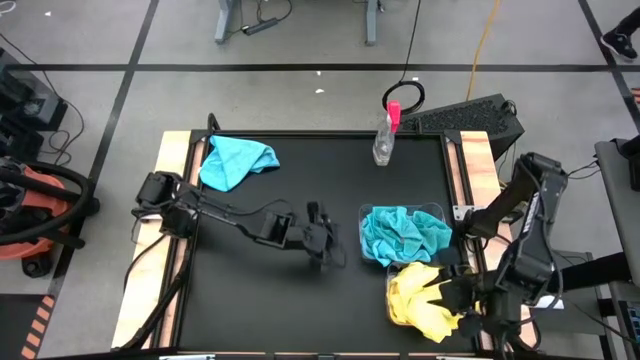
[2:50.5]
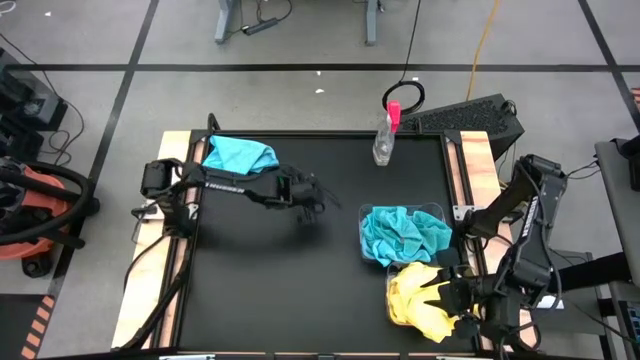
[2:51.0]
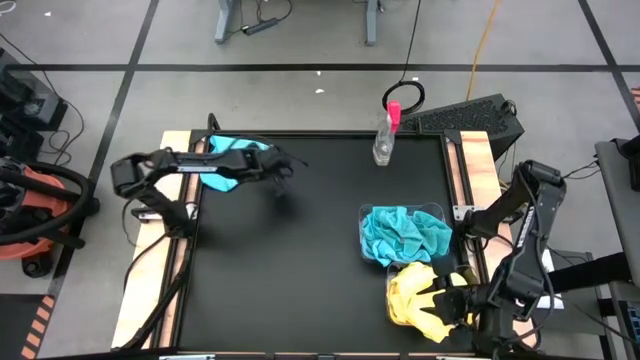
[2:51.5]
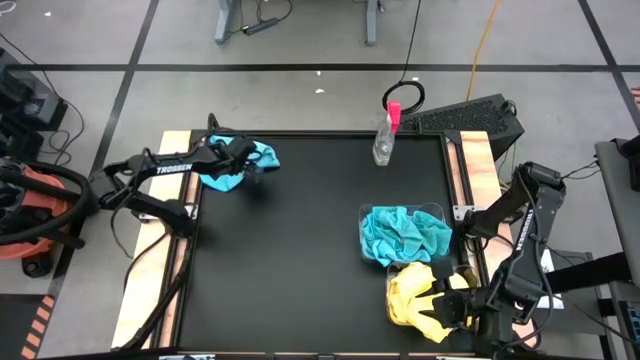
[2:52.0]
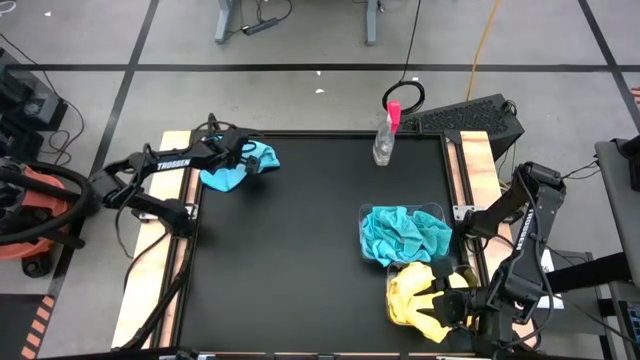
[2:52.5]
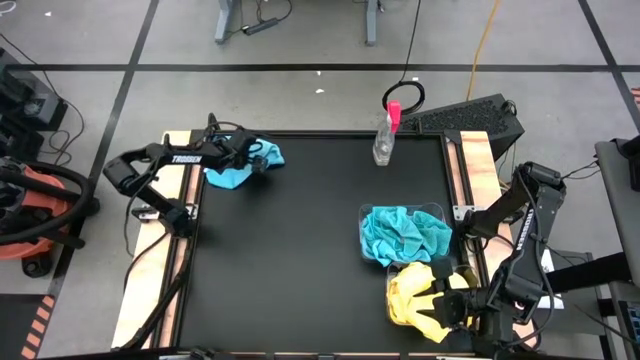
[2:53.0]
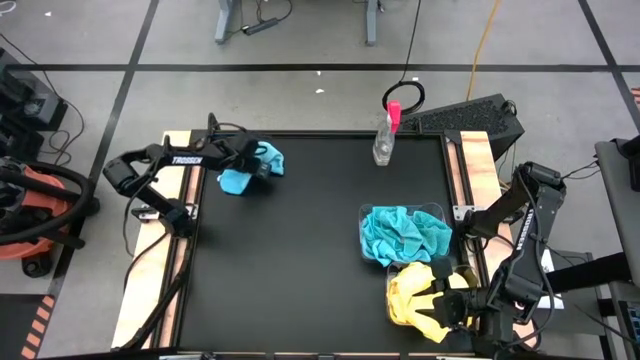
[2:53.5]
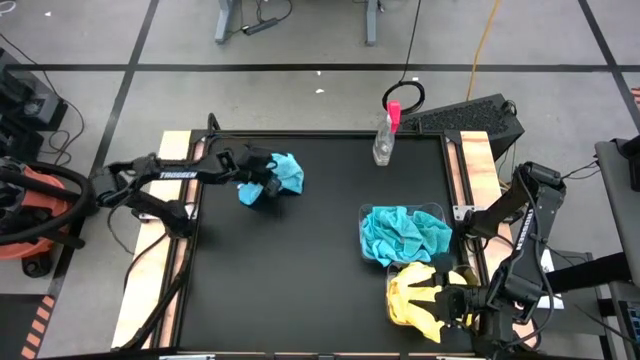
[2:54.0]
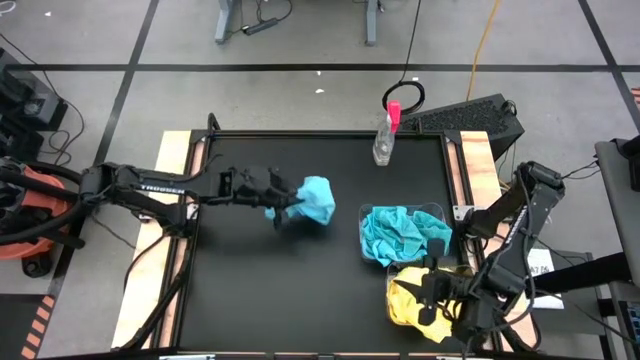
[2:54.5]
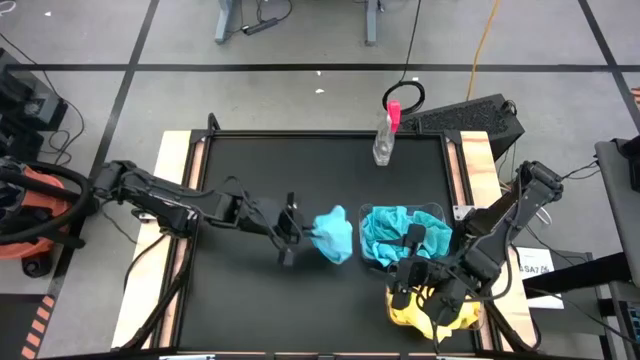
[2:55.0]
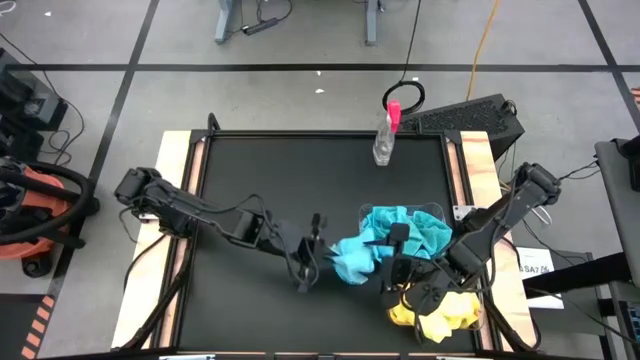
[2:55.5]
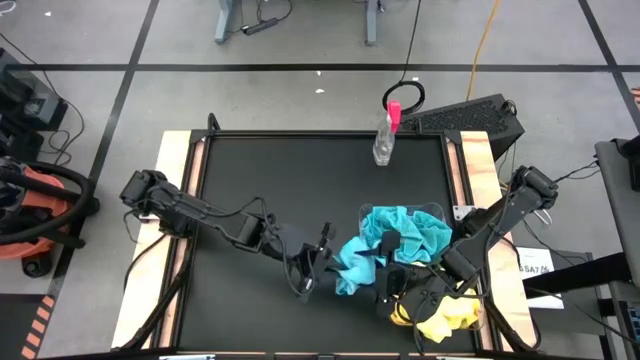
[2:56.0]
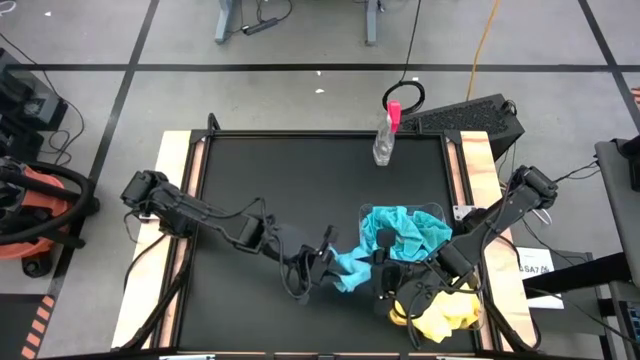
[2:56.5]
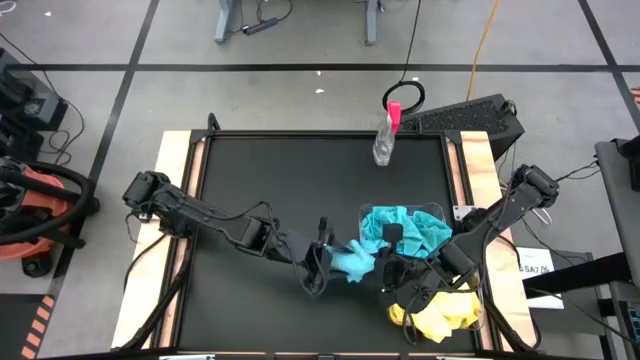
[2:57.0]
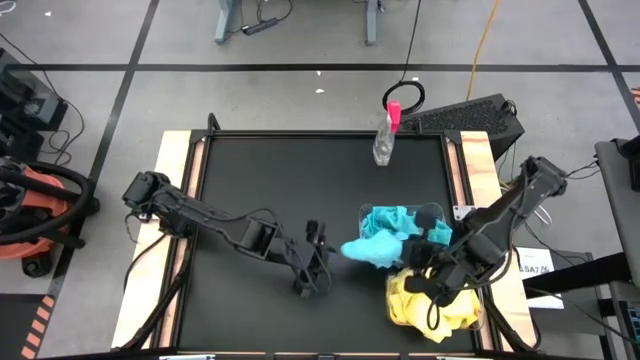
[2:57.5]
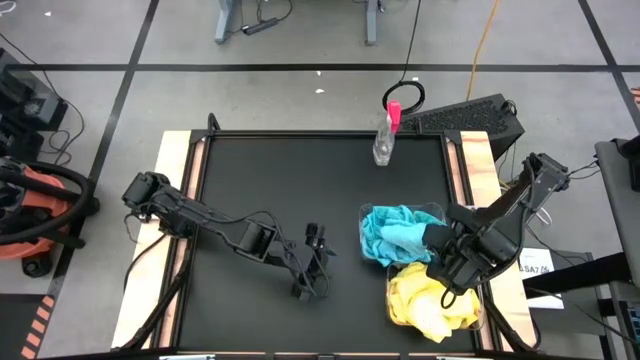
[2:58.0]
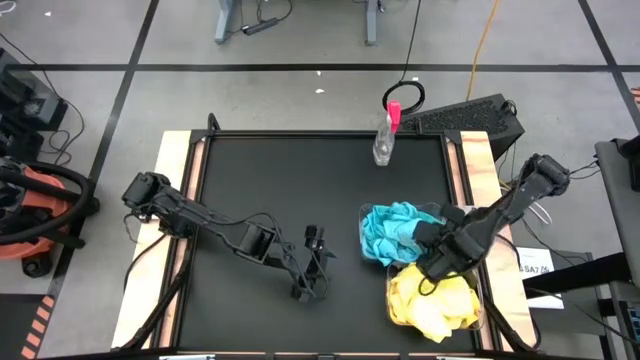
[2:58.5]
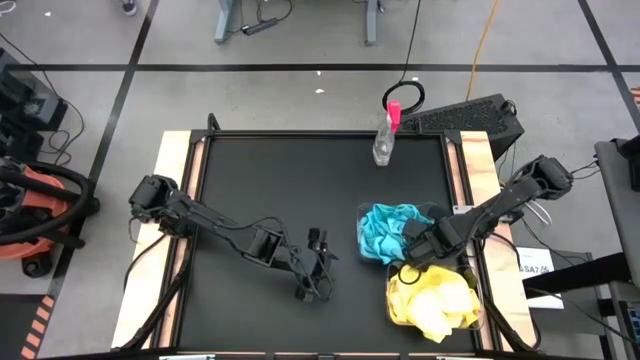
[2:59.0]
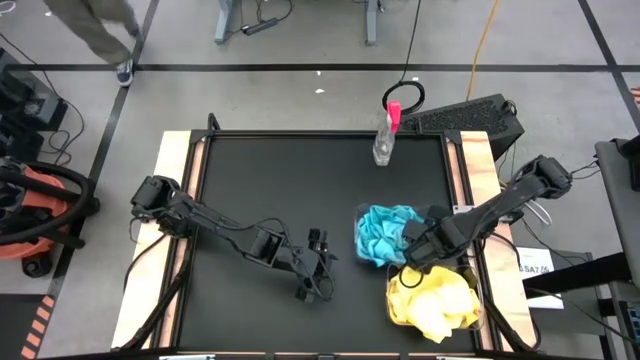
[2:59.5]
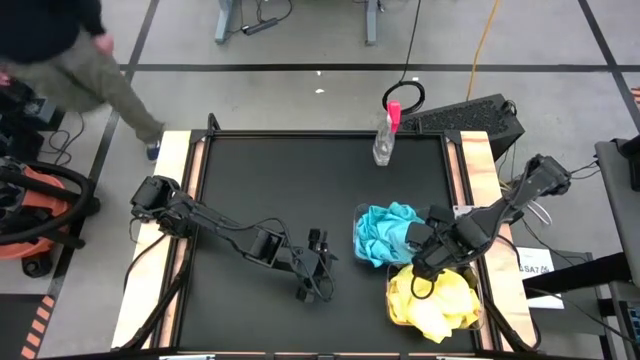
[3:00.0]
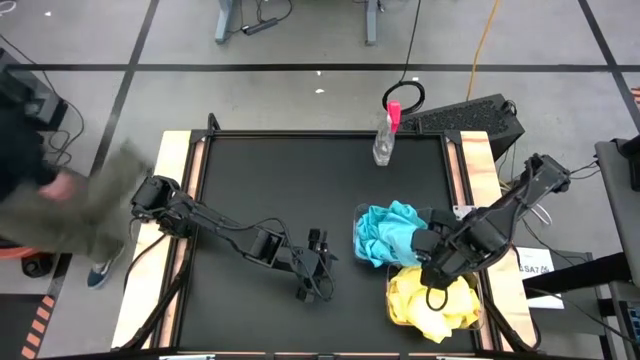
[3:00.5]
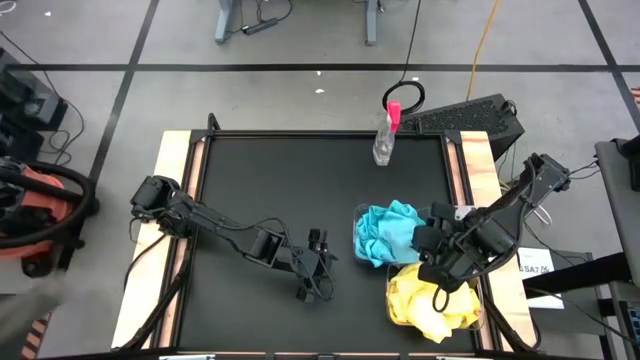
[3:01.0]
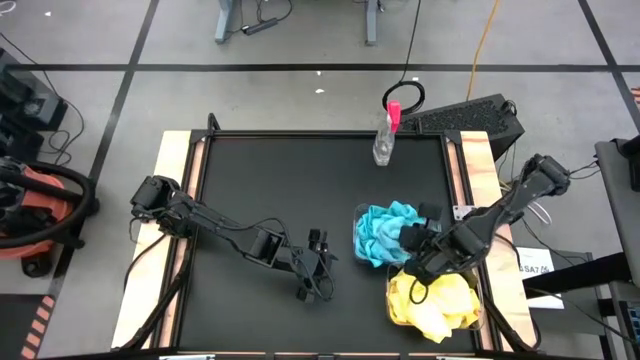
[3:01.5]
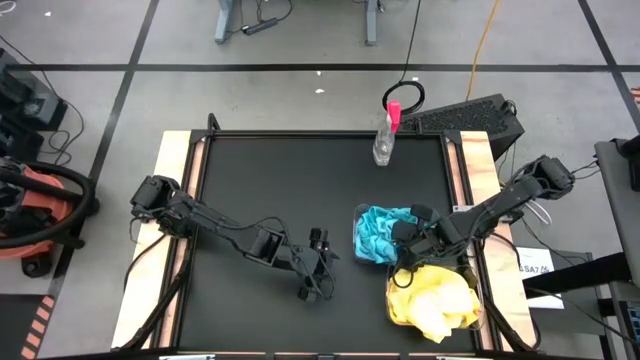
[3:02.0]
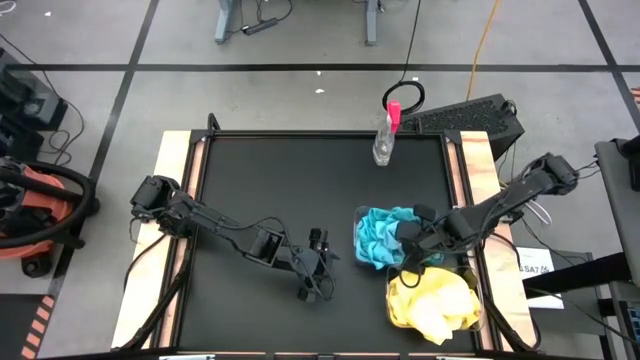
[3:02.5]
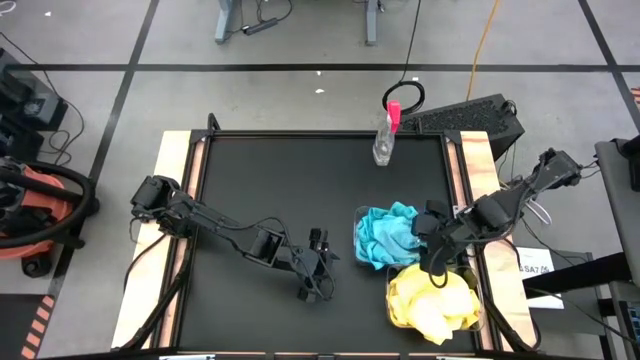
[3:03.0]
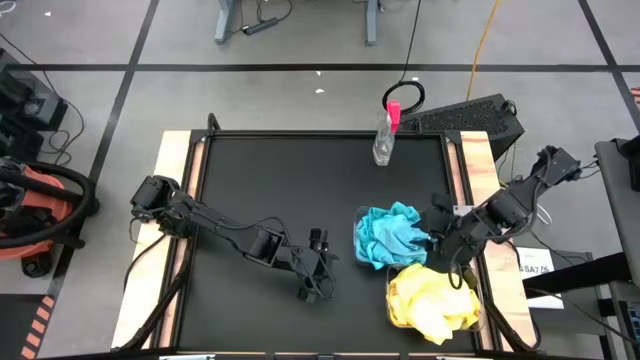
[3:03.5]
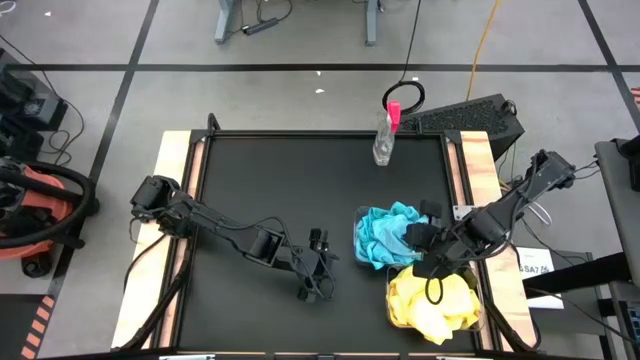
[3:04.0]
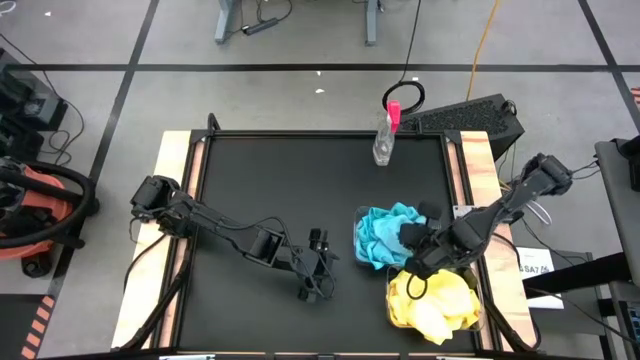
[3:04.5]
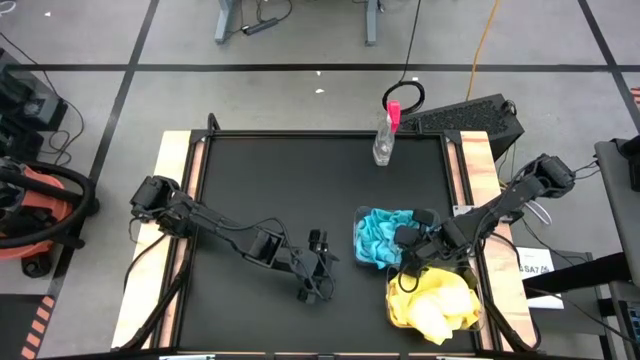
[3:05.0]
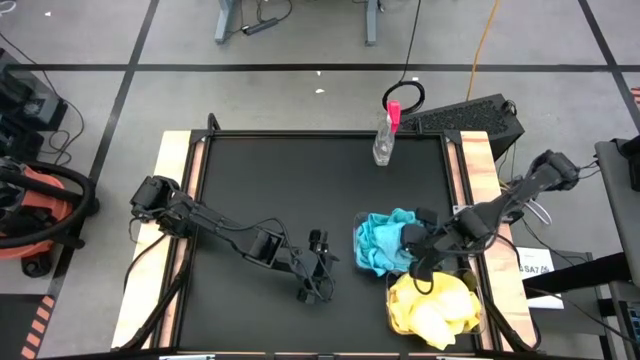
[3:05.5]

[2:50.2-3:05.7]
Task: Sort microfiber towel by color & place in baskets
Put the blue towel into the top transparent bin

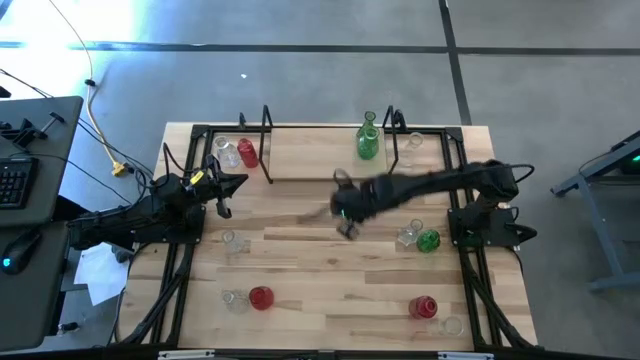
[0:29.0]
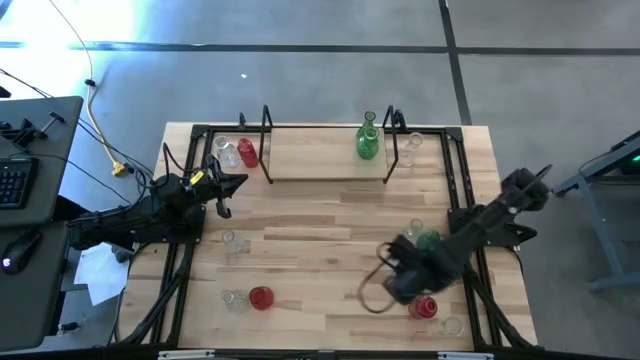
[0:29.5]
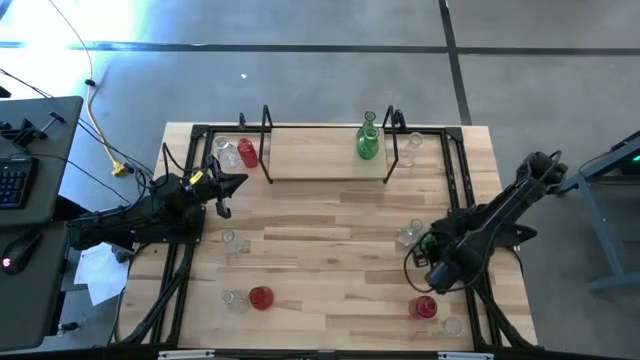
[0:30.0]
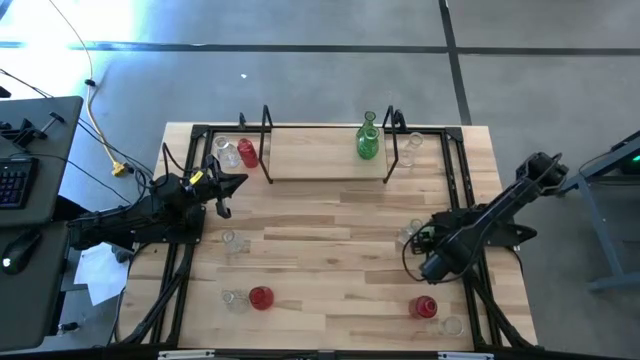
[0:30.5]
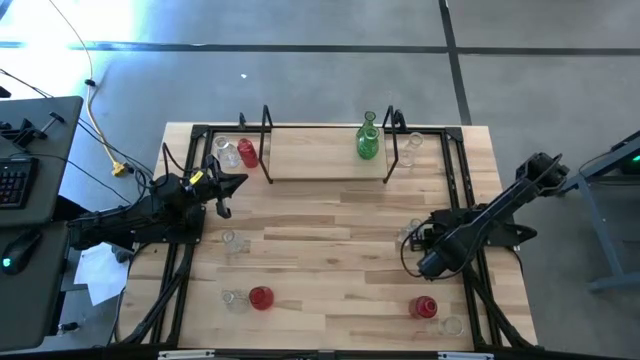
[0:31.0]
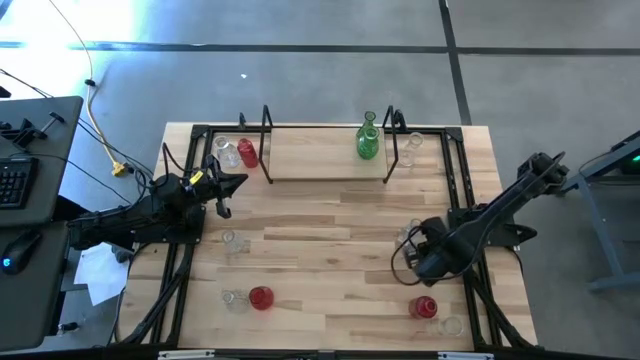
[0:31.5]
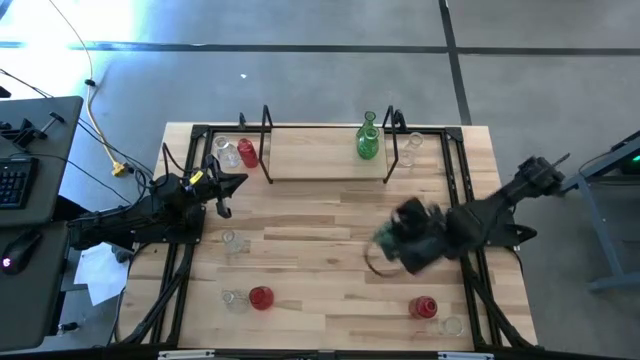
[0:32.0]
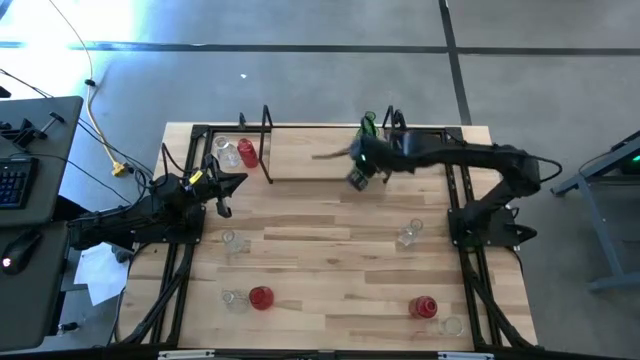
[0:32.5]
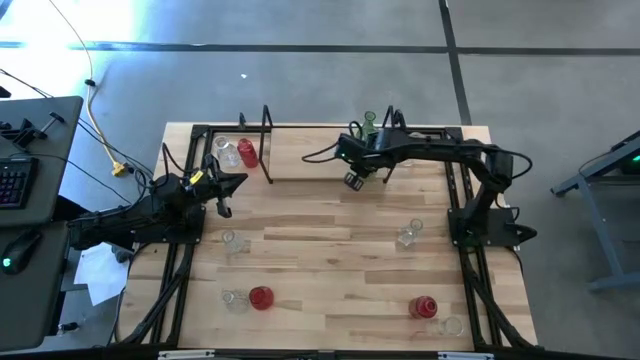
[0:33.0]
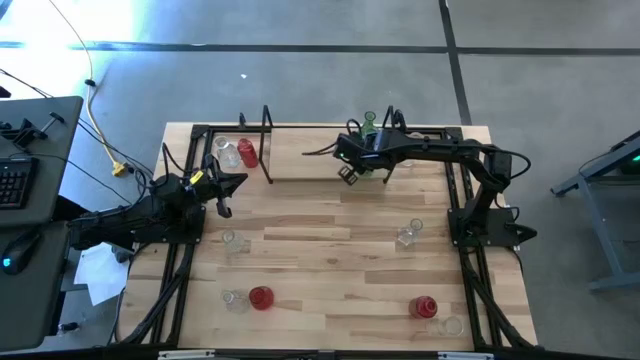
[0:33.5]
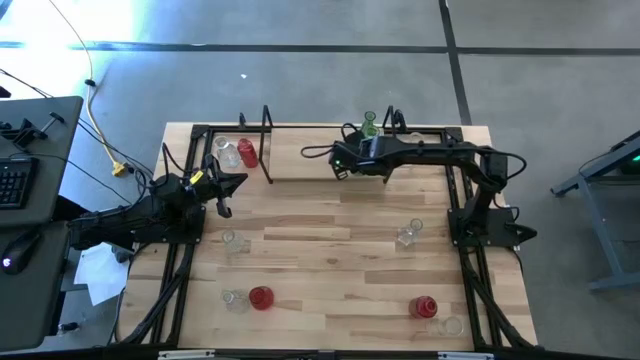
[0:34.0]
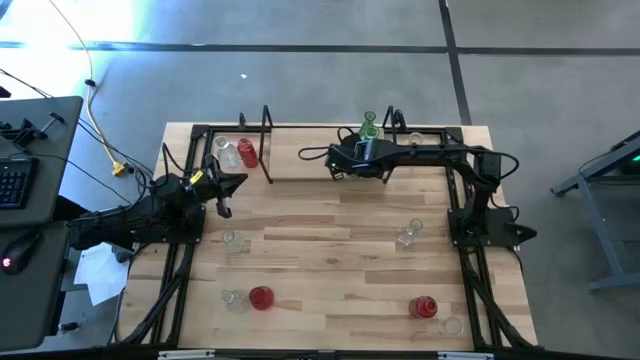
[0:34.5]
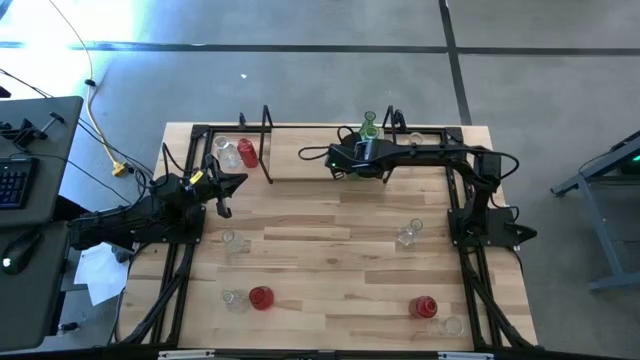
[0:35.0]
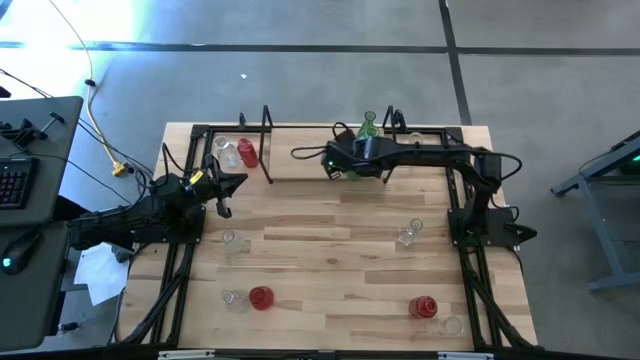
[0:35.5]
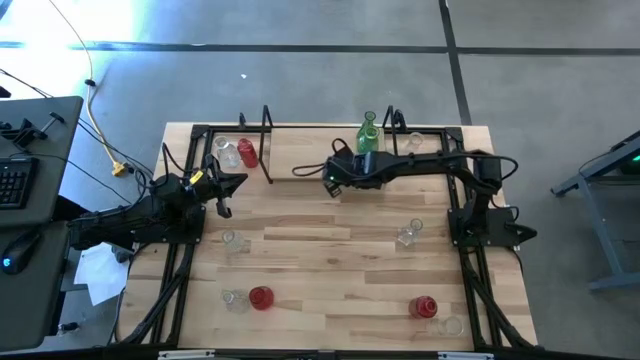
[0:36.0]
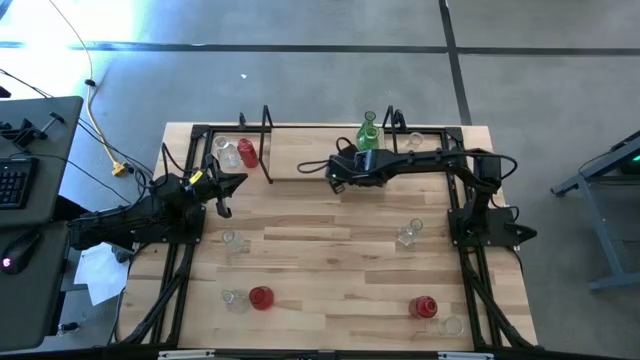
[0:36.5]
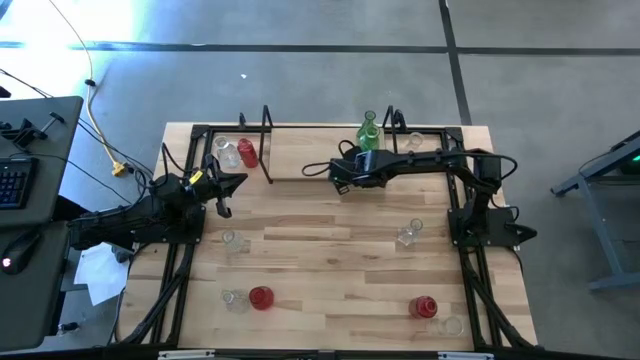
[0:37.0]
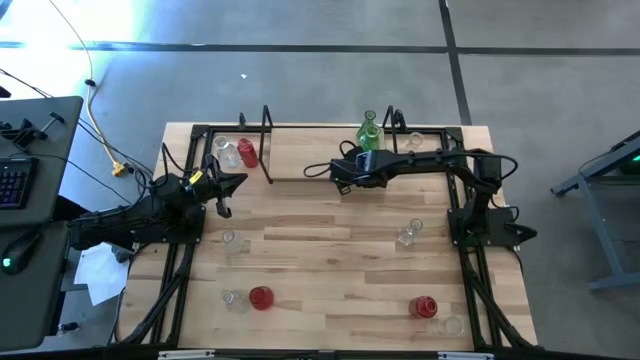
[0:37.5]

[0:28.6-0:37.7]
Task: sort vases onto shelf
Put the green vase aligned with the other green vases on the shelf
